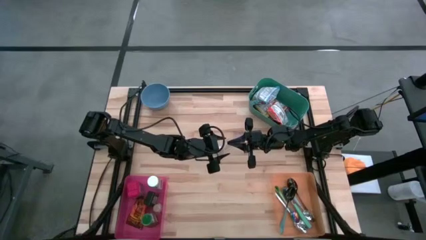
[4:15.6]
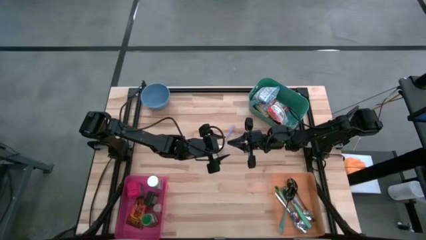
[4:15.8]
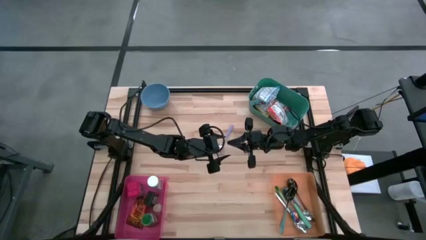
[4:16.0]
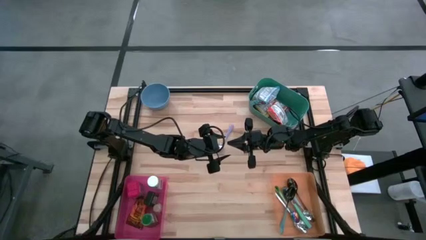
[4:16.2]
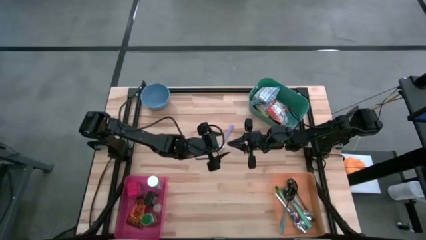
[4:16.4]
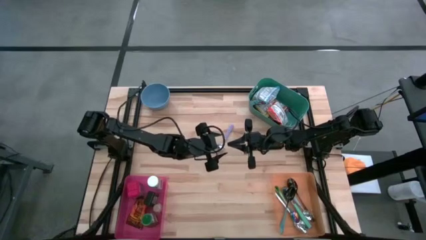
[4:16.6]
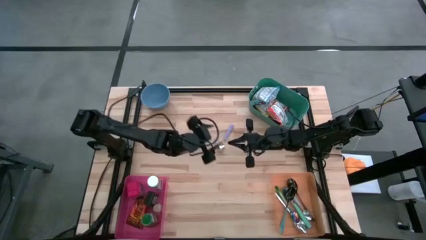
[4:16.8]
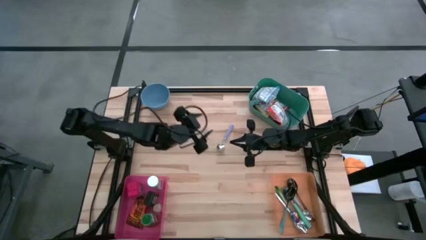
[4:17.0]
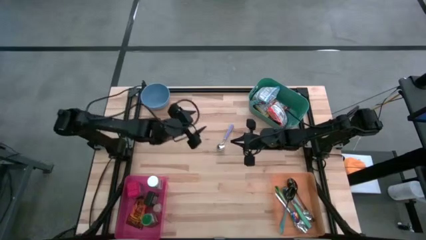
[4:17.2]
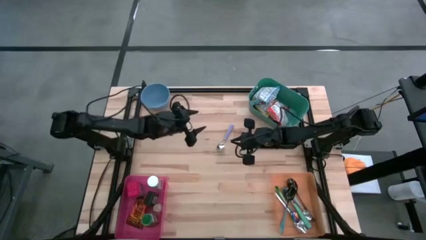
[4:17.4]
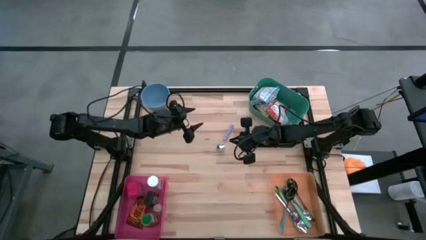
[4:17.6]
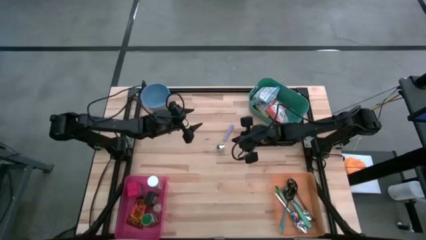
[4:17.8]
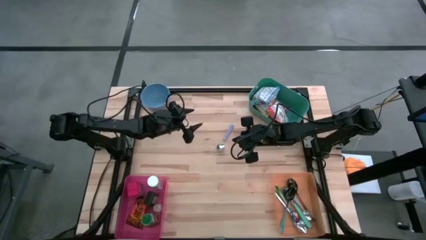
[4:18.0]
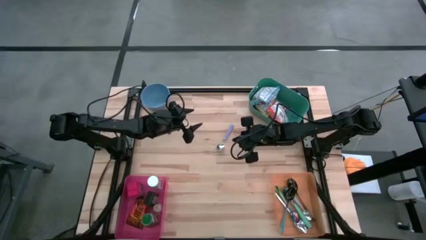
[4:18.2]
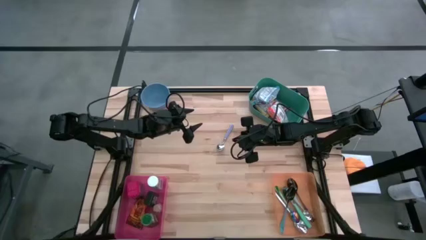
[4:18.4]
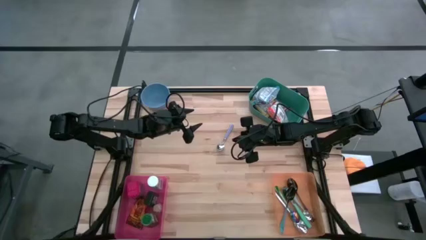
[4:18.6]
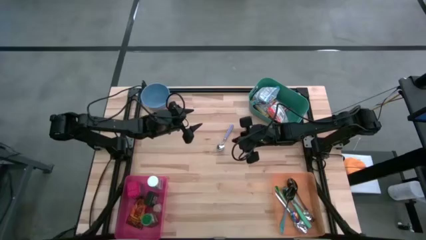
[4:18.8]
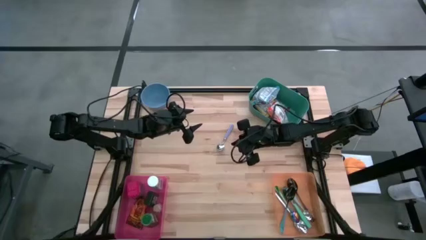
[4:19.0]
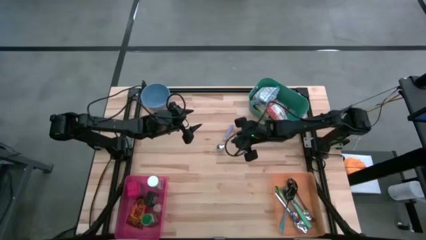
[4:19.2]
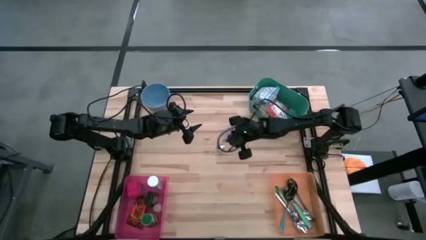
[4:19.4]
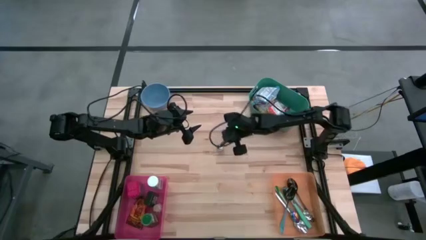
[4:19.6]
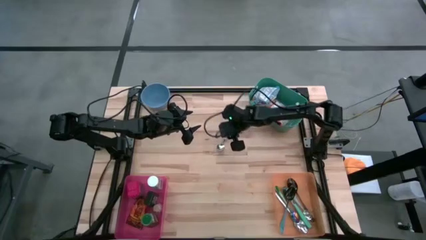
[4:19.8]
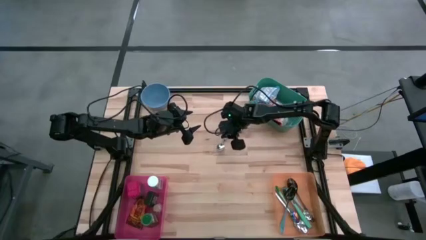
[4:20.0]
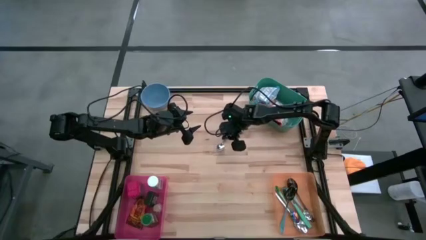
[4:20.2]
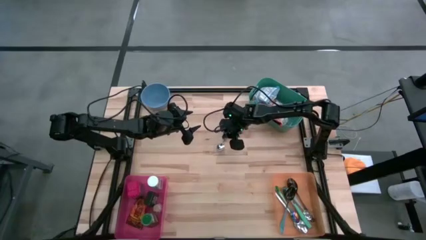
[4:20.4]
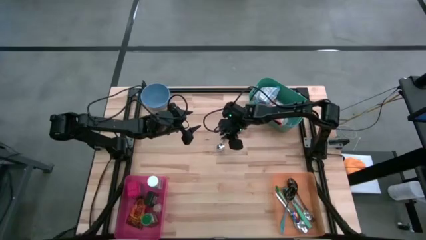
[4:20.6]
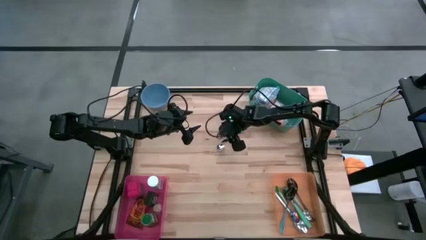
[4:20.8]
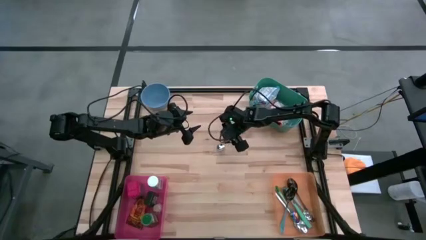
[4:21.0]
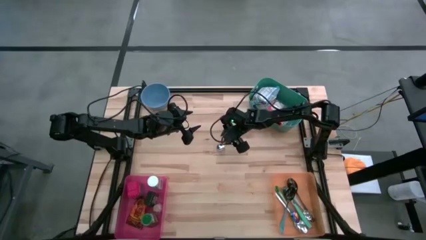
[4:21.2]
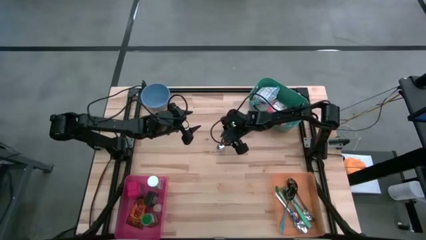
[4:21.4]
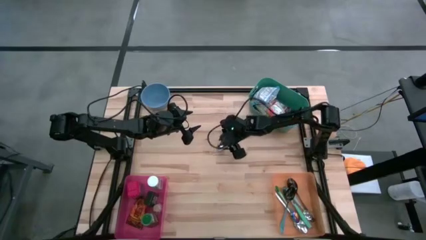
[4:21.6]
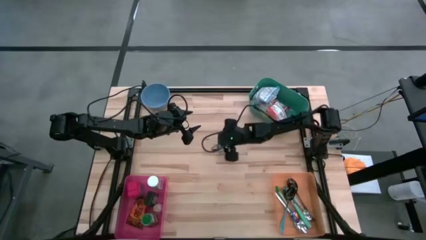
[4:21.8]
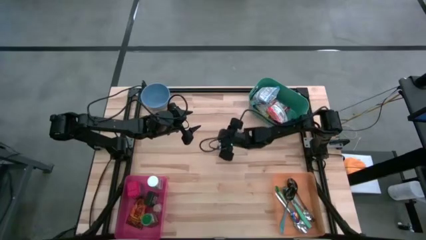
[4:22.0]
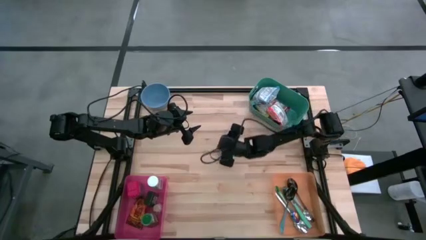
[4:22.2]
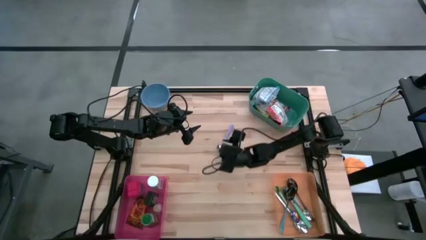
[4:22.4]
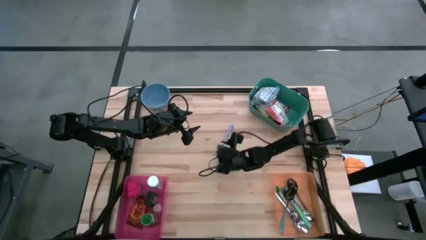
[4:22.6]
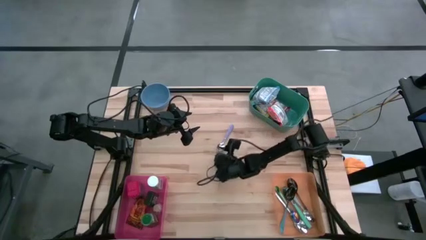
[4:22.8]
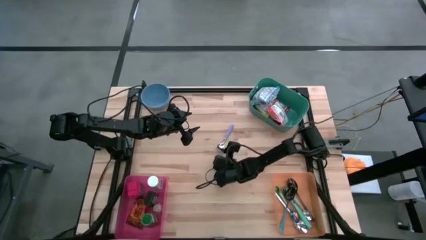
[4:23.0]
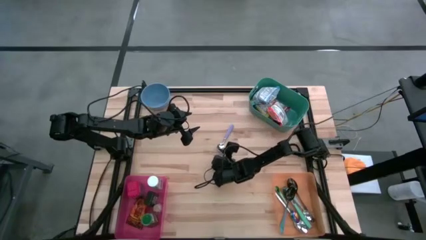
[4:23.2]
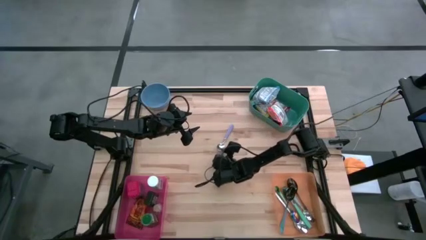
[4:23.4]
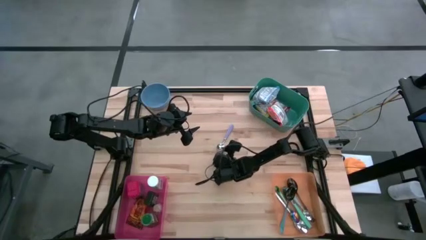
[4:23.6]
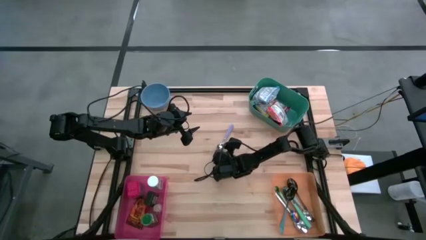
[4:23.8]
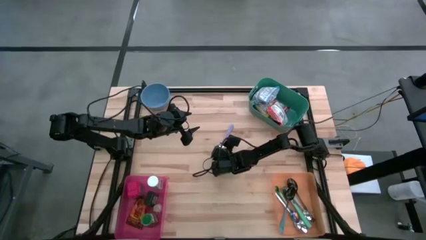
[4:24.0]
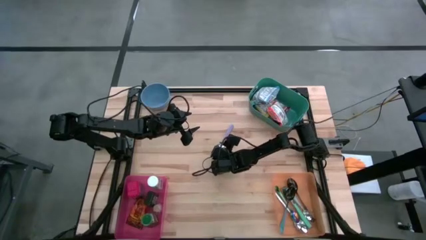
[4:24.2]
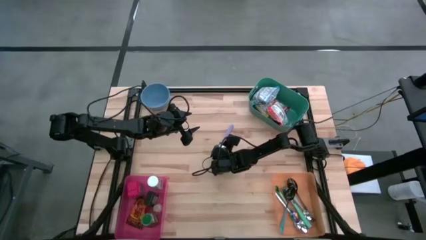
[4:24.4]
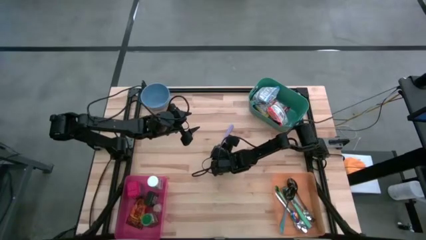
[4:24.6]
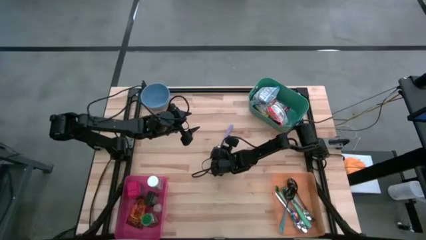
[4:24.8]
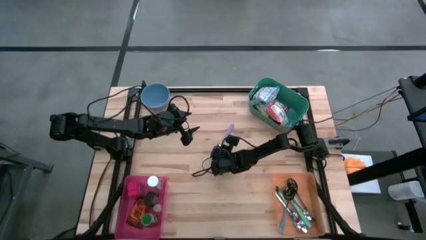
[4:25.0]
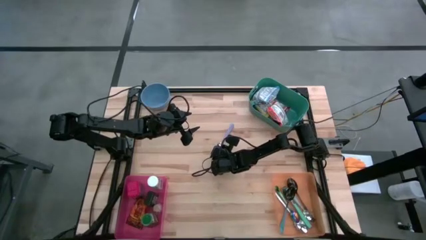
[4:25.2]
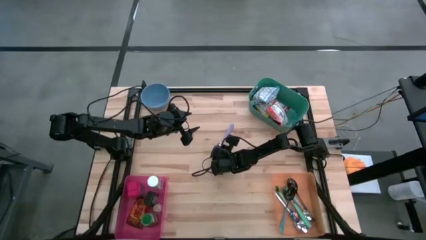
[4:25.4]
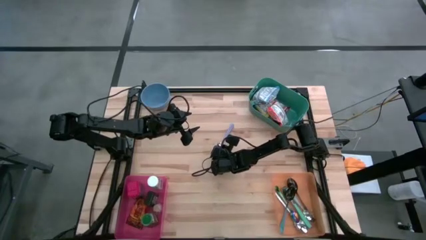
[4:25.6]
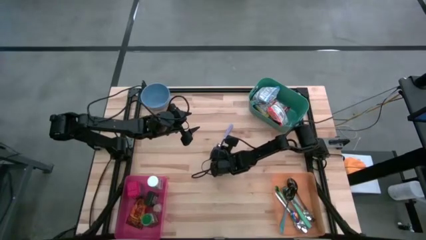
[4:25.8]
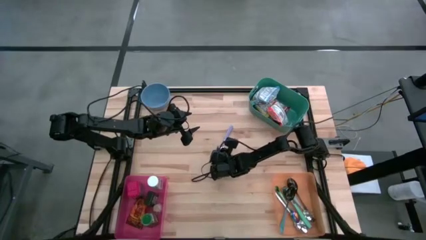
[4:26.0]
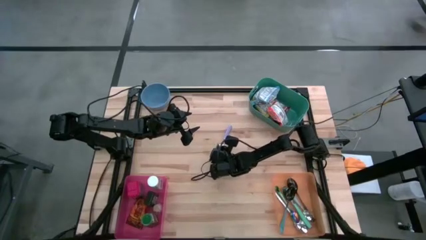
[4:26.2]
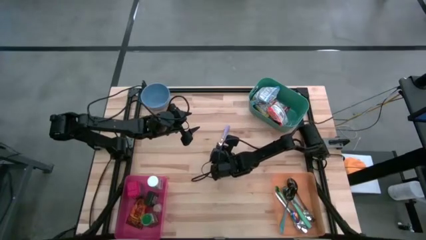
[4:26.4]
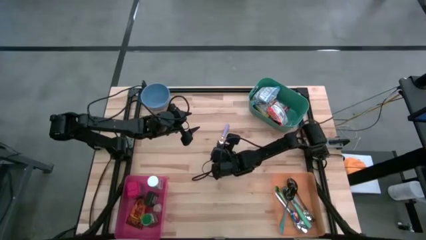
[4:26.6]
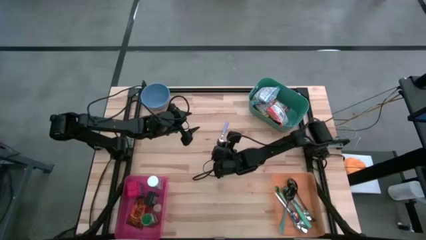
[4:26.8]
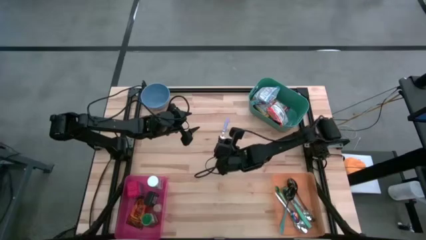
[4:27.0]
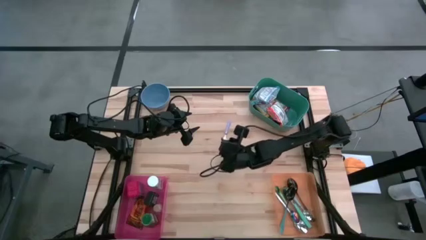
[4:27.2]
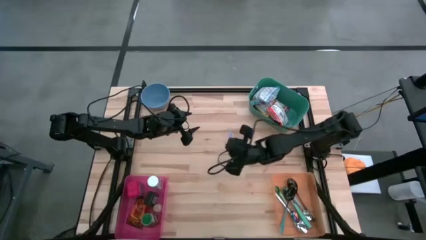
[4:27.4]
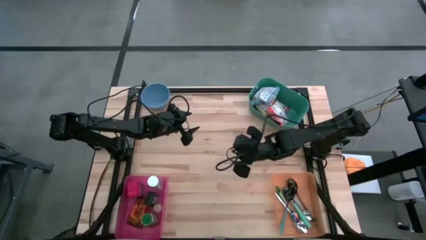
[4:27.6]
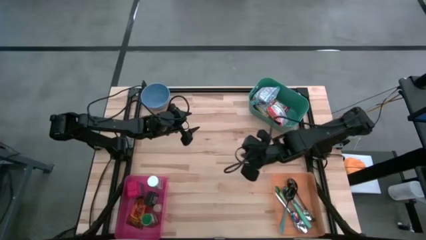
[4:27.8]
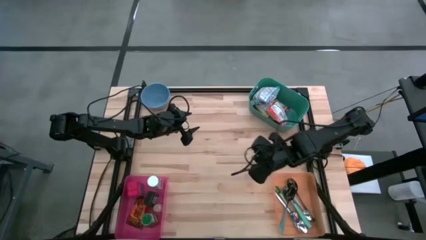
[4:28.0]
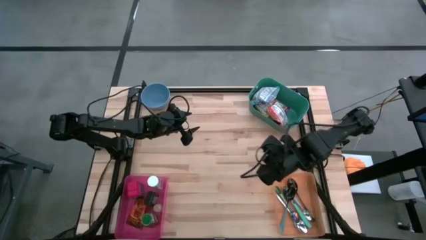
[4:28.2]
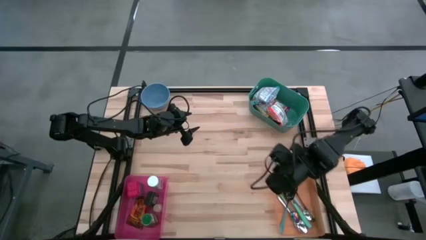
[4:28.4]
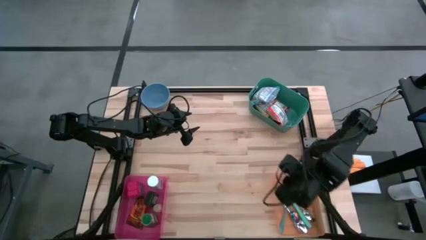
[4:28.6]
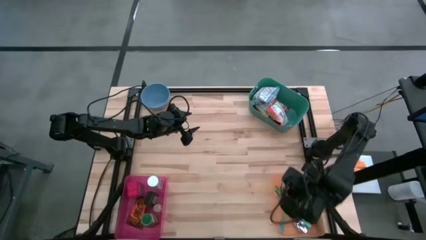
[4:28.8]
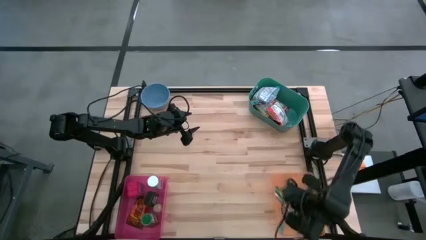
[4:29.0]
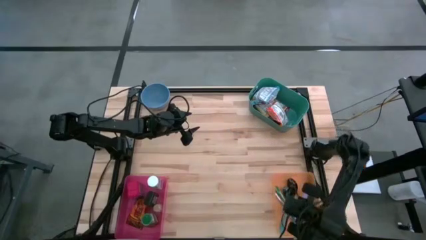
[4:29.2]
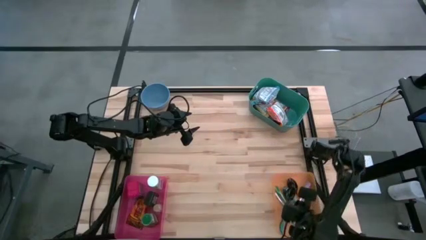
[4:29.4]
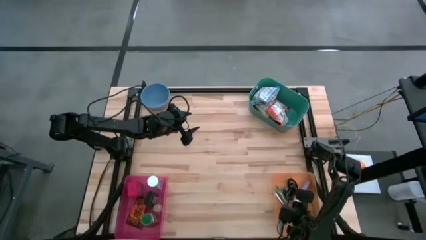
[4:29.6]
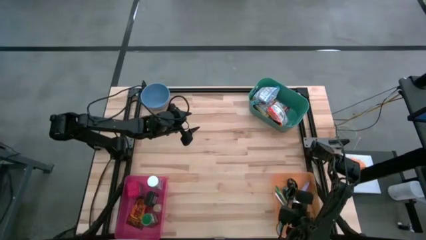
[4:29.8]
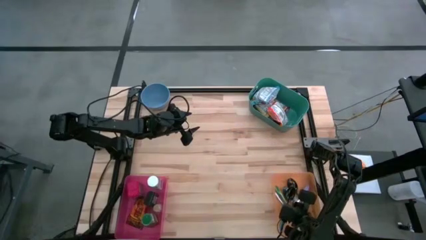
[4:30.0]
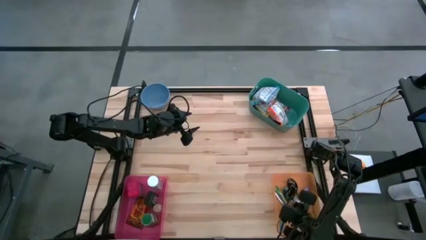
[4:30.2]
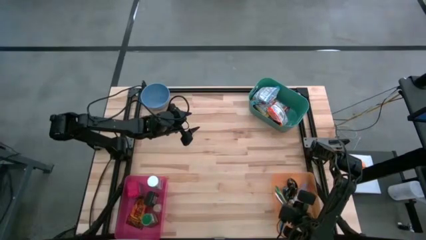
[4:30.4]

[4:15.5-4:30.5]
Put the purple spoon into the orange bin
